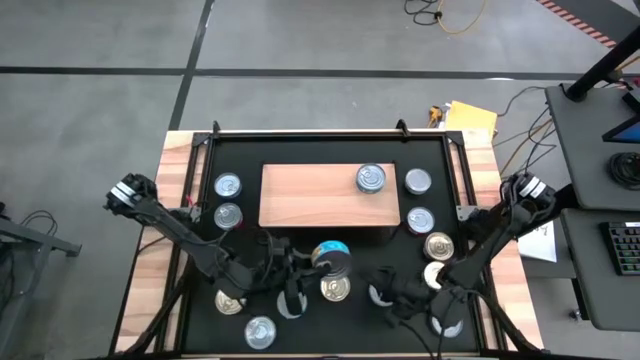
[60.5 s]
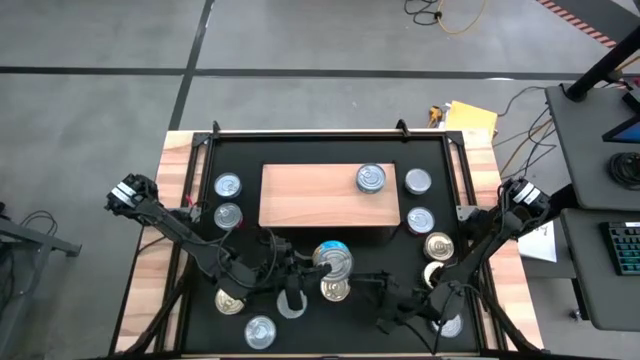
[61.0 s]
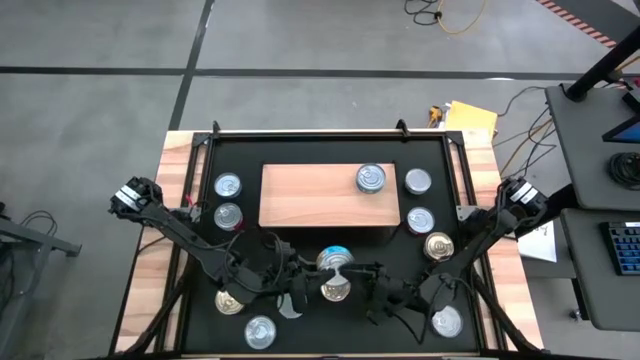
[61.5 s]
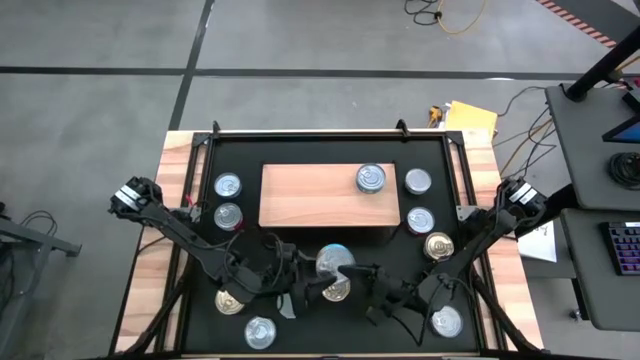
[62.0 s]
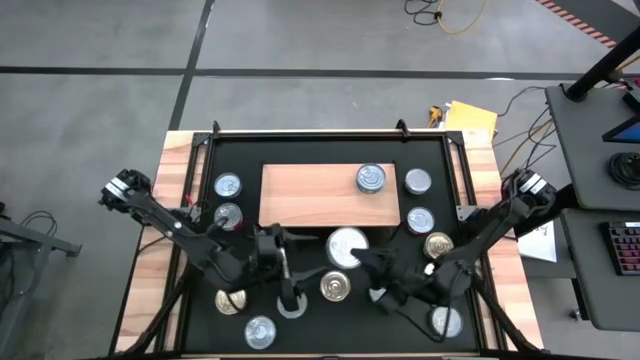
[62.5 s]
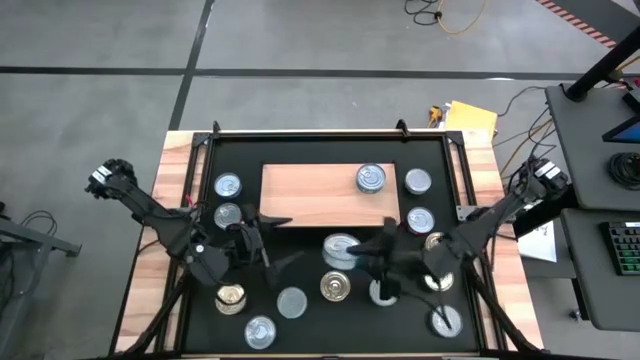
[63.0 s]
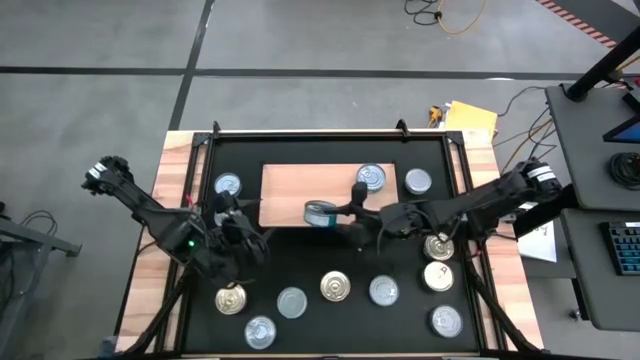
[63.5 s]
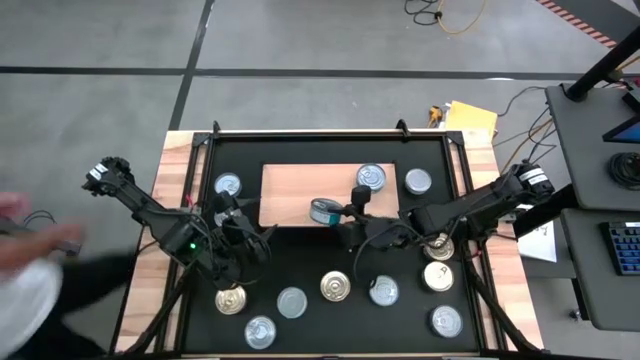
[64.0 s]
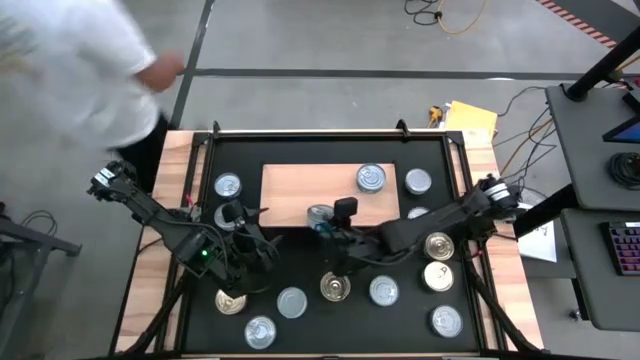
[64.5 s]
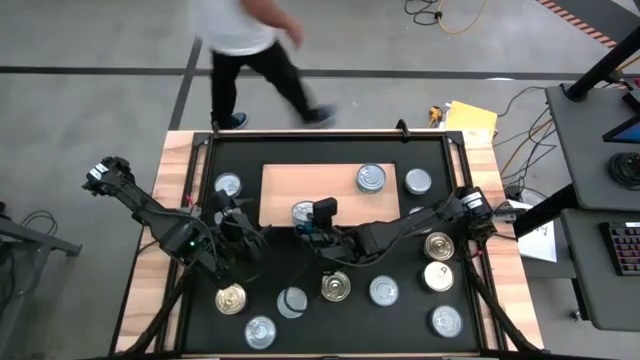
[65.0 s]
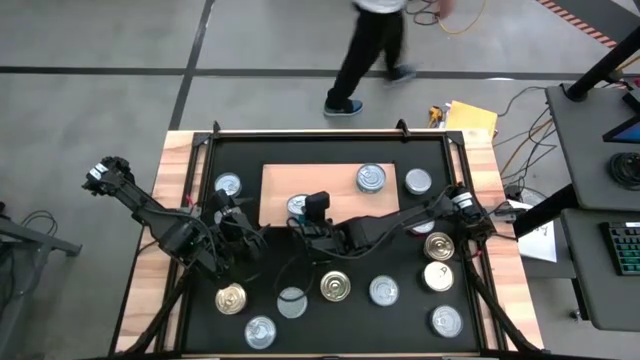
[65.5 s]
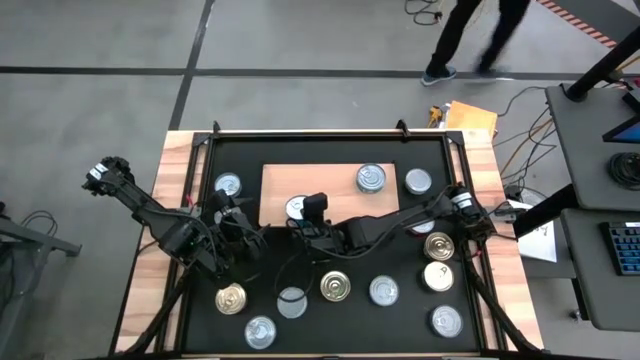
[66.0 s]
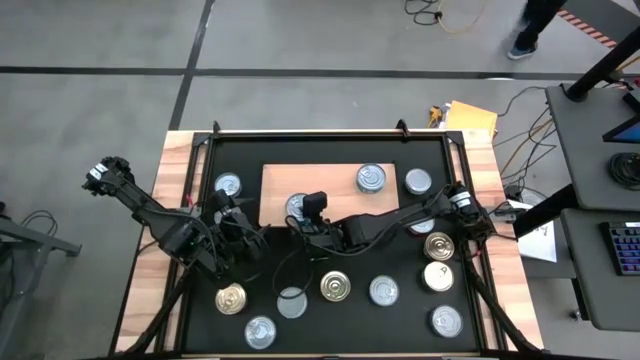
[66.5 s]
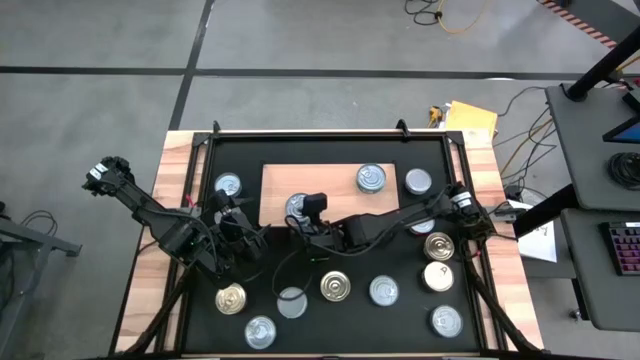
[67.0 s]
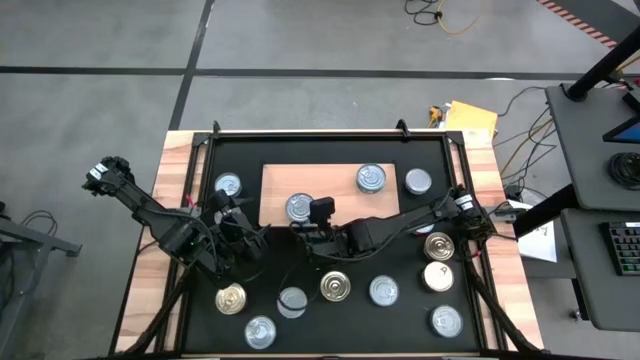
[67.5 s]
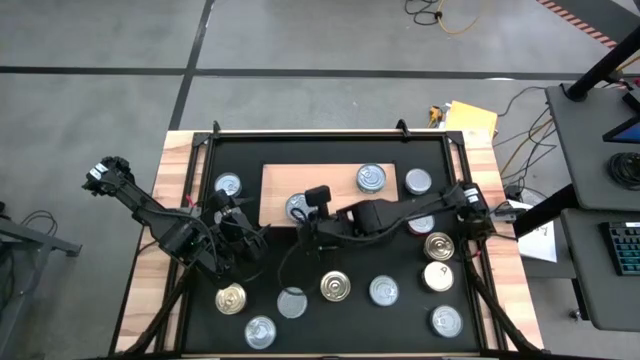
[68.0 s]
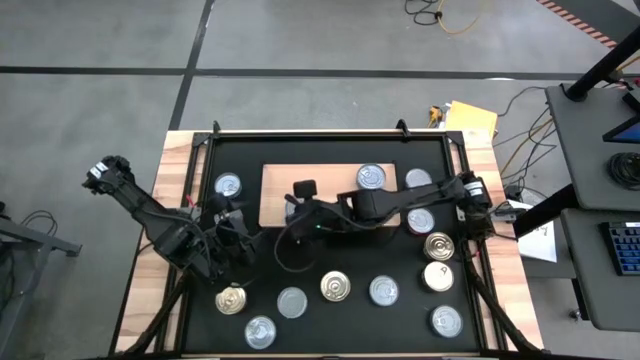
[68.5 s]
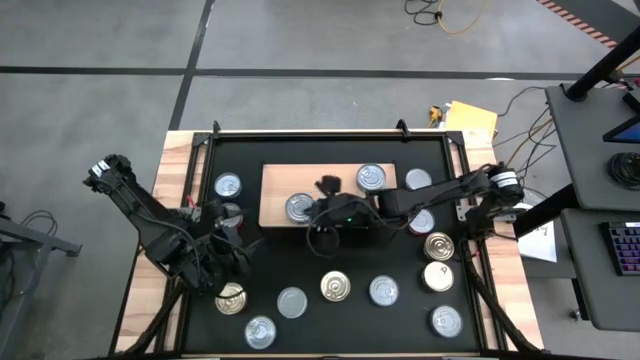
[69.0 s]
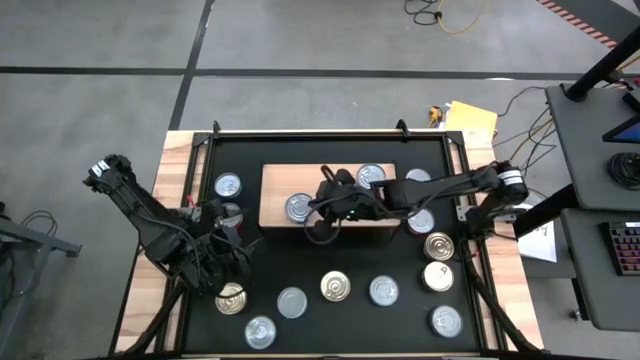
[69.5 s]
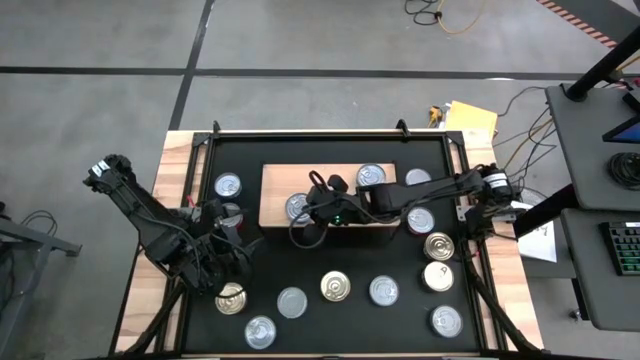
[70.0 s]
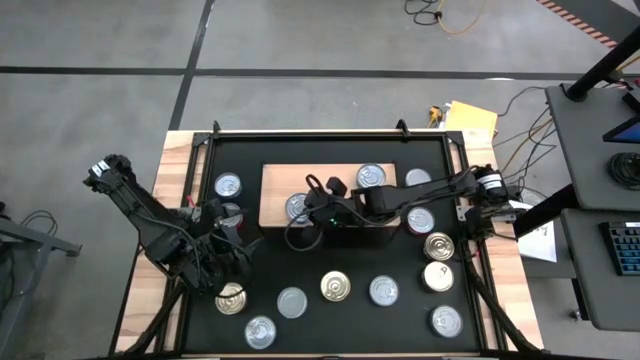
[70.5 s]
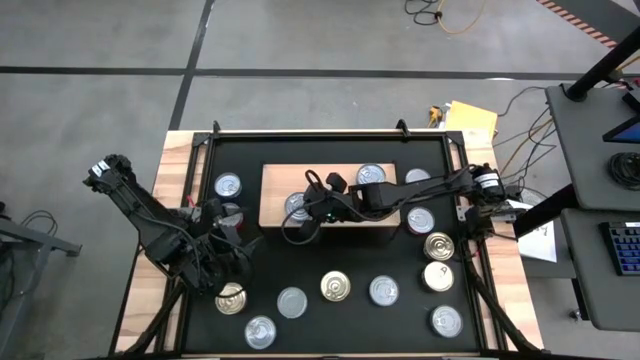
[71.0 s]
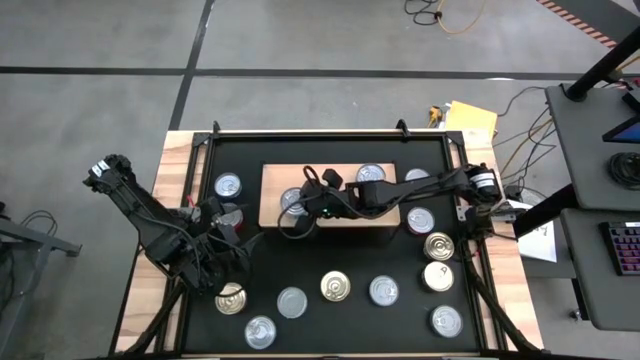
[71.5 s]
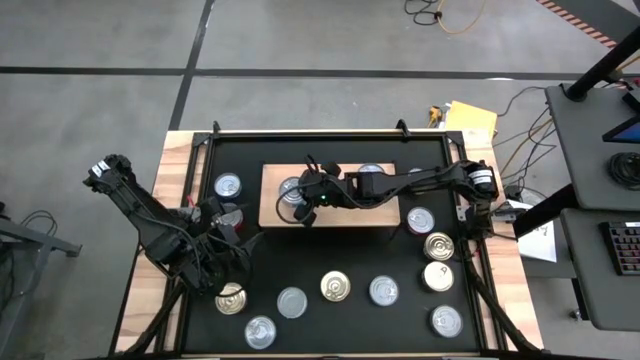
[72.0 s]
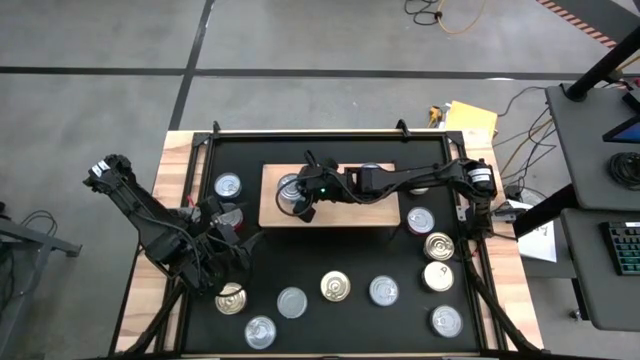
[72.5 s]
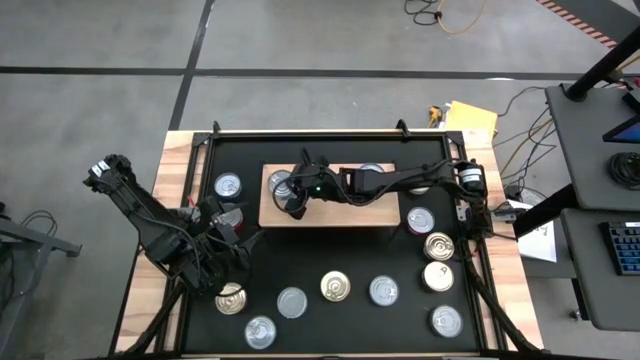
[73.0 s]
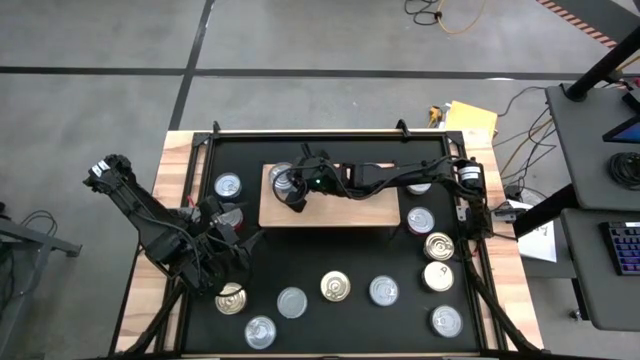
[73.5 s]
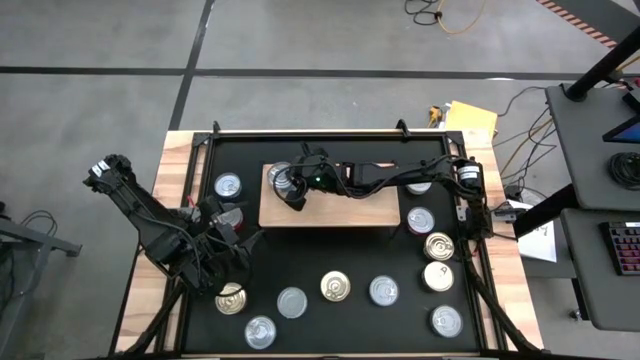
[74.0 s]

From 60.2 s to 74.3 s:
Task: Stack canned seafood by type on shelf
Put the light blue tuna can on the shelf

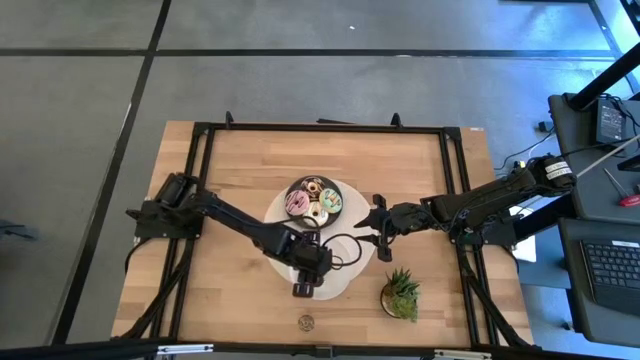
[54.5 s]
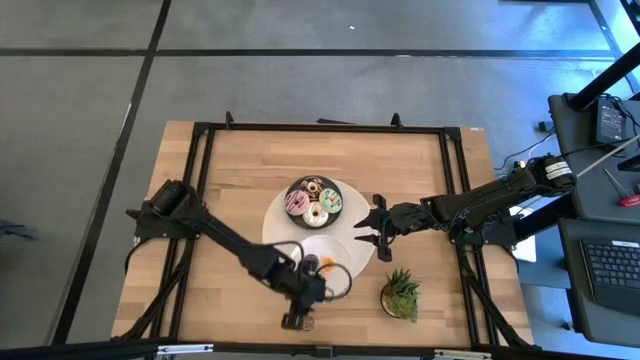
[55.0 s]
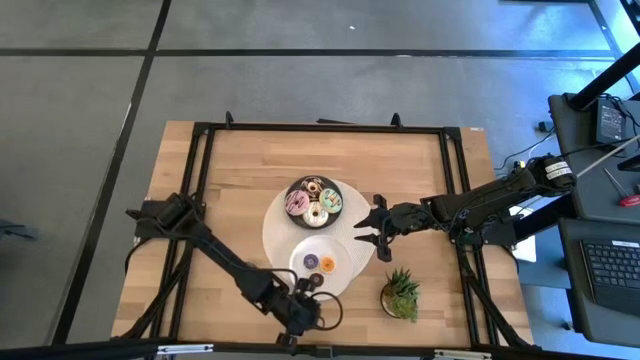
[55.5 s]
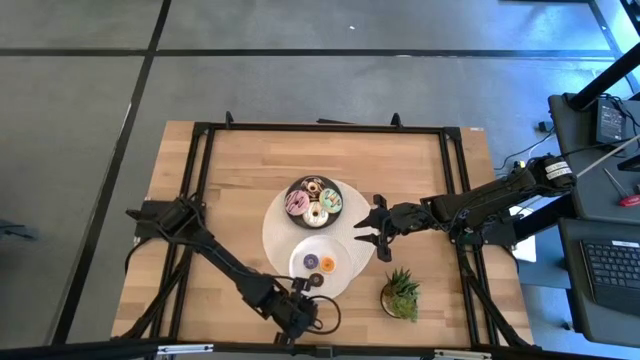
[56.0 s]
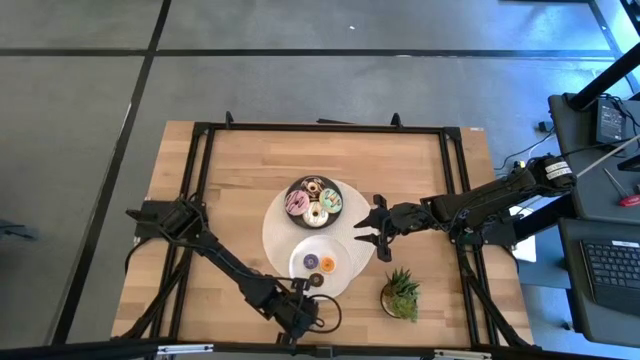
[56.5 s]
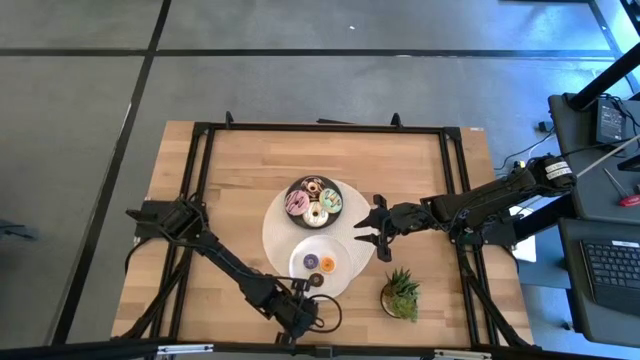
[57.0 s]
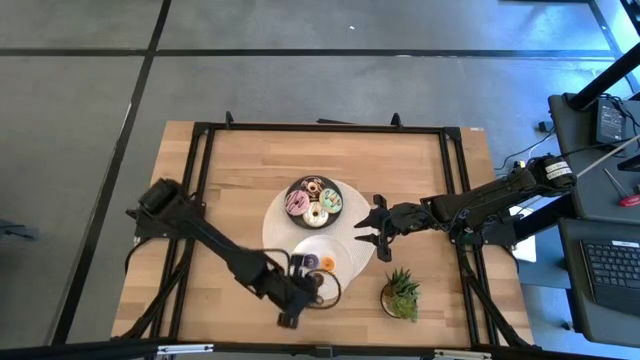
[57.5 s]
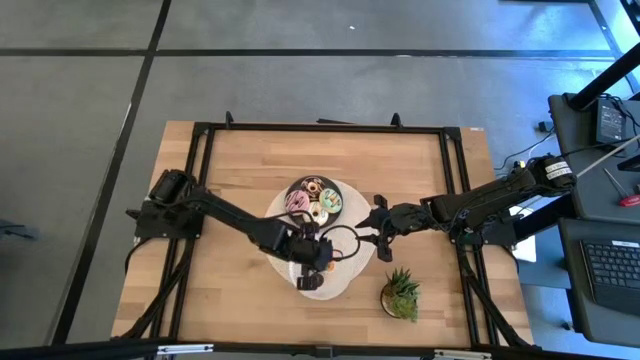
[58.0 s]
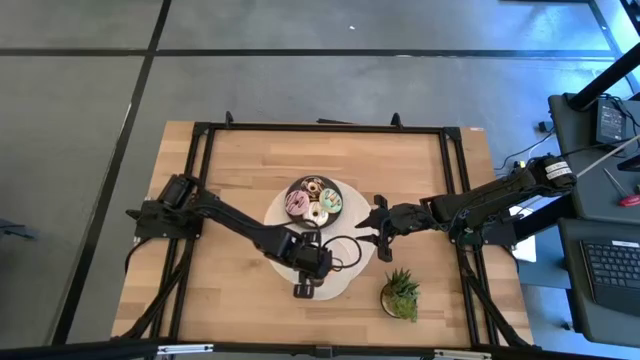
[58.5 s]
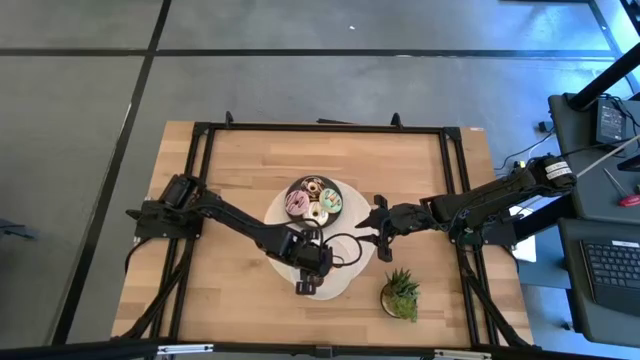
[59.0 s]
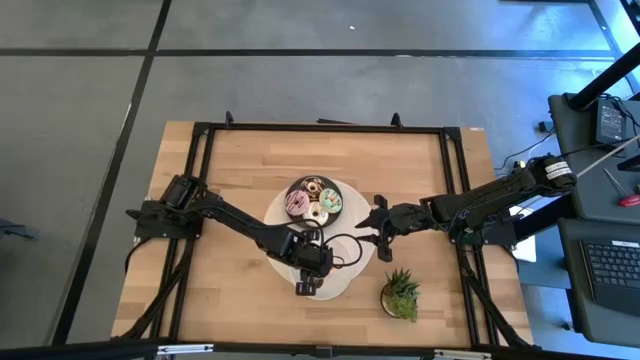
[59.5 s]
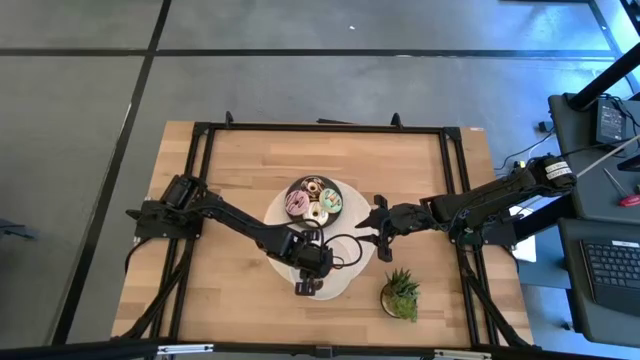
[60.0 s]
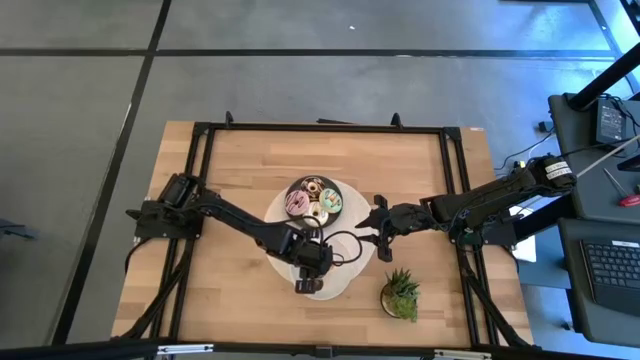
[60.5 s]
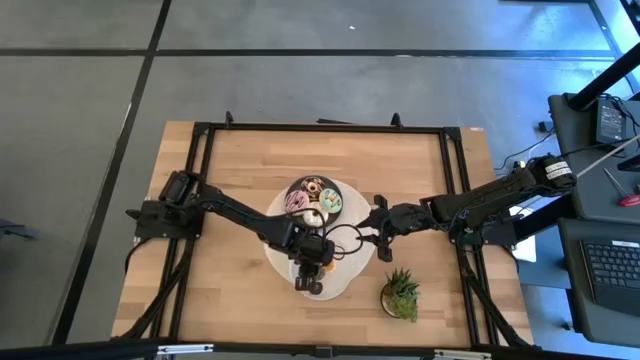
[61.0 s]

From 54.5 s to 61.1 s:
Task: Pick & Place donuts
Put the small light brown donut on the white plate
